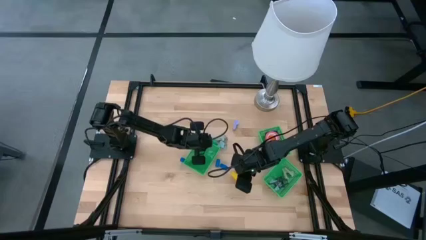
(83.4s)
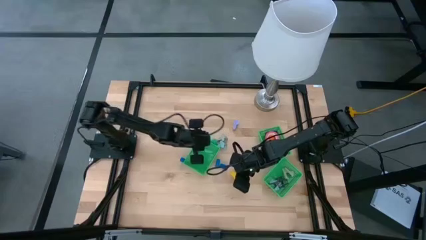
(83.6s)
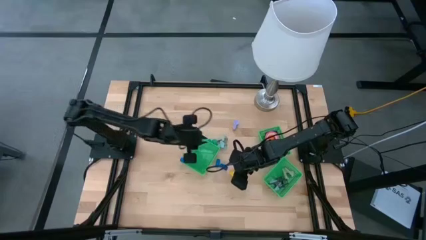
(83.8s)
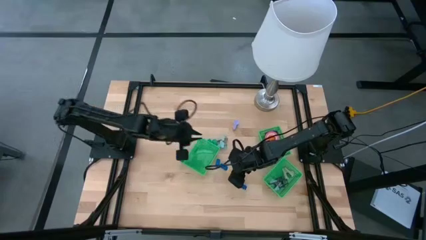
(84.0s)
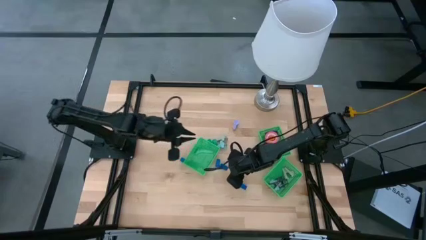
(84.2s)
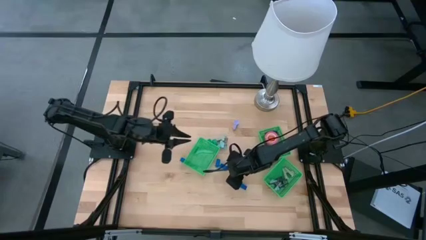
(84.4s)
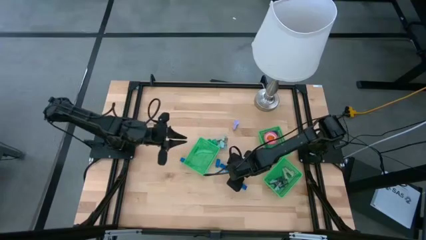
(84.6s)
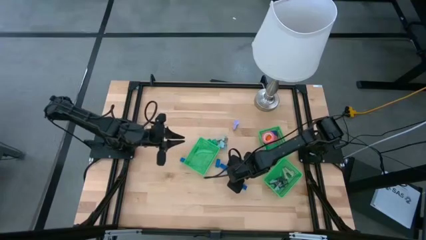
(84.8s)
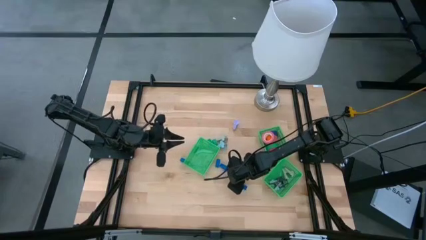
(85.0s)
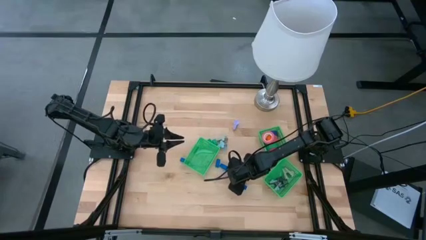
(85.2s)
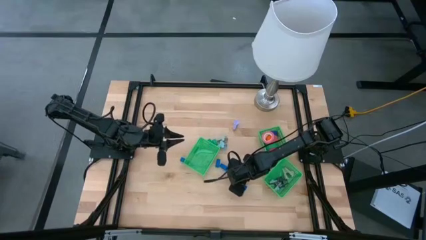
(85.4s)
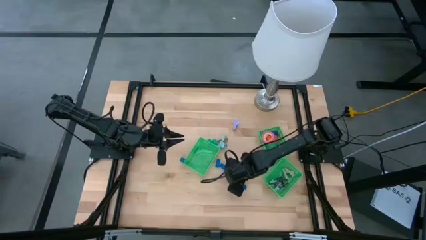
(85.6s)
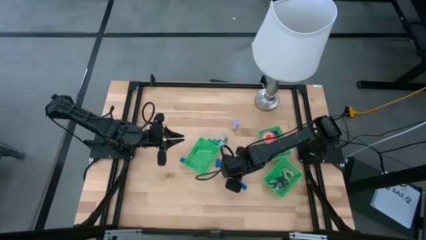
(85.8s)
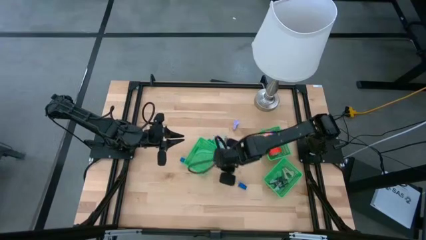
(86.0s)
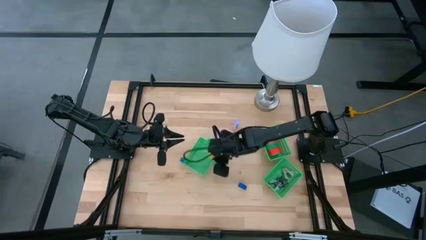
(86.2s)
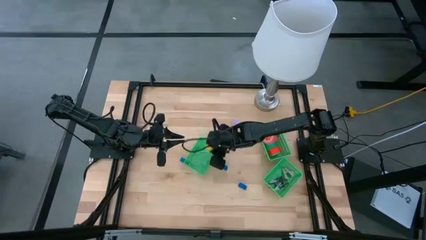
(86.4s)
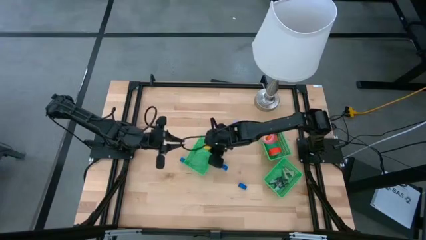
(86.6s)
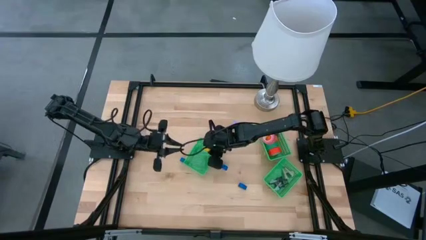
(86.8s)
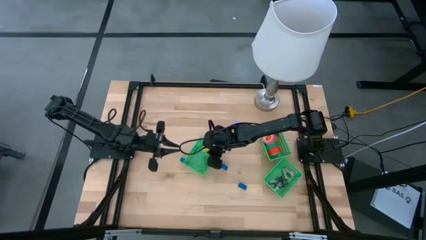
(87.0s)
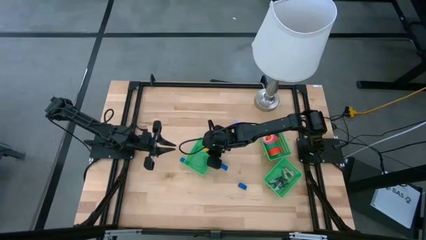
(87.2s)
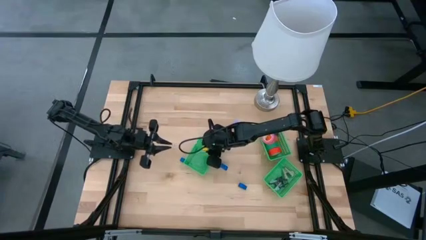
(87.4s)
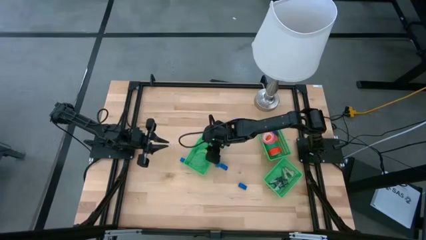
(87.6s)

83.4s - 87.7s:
Task: Pick and place Stapler, Stapler remover, tape
Put the yellow stapler into the center green bin

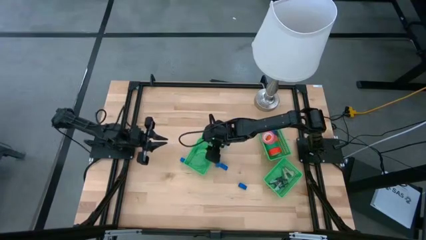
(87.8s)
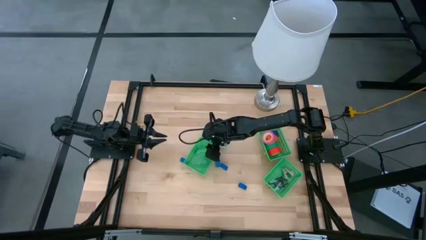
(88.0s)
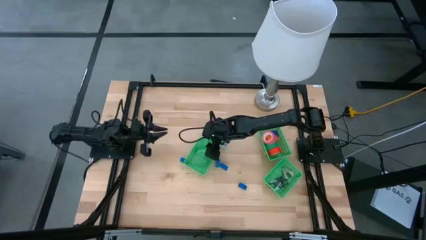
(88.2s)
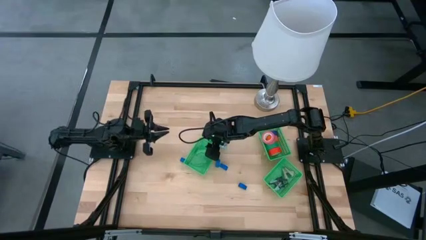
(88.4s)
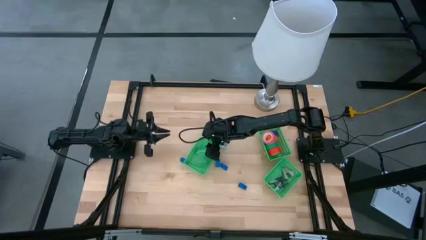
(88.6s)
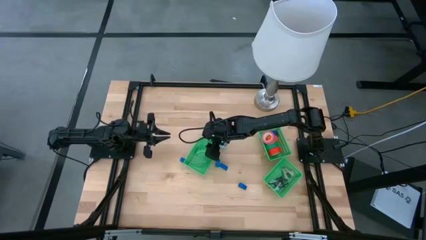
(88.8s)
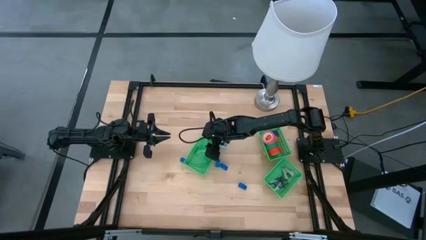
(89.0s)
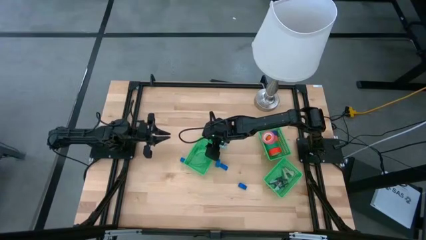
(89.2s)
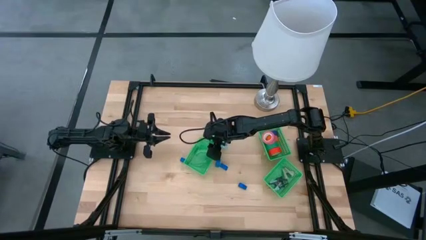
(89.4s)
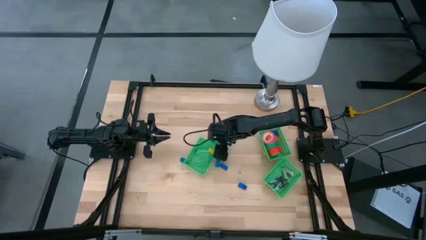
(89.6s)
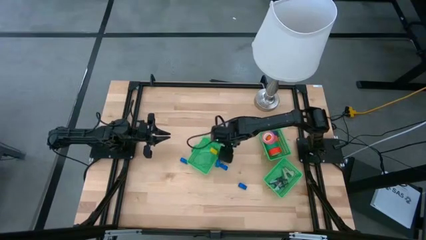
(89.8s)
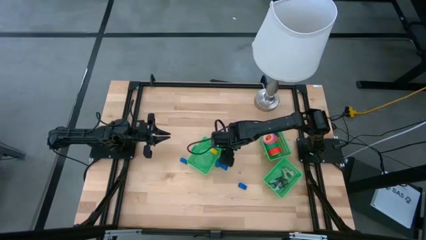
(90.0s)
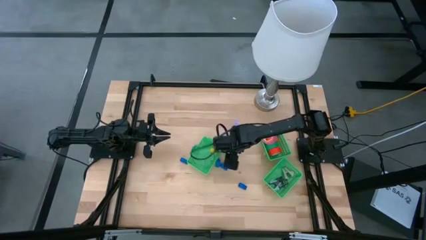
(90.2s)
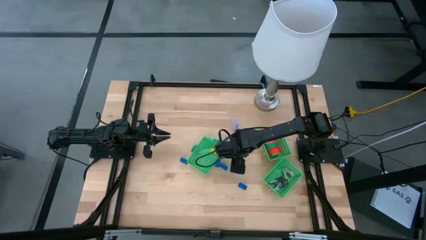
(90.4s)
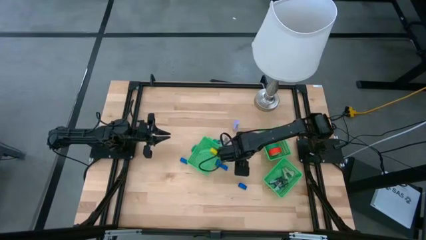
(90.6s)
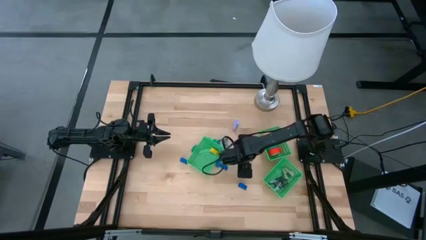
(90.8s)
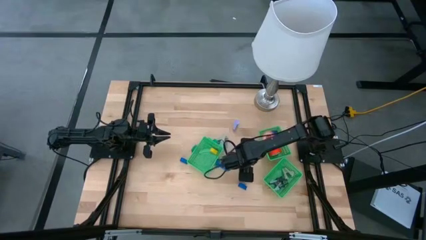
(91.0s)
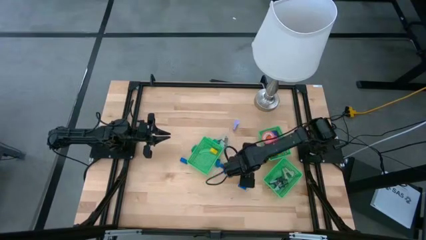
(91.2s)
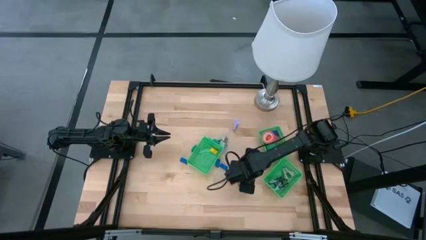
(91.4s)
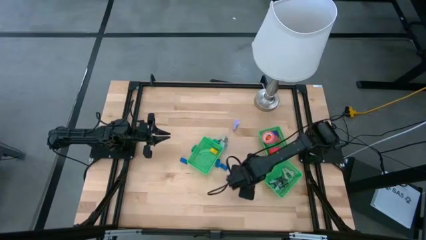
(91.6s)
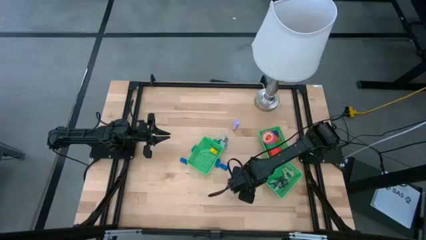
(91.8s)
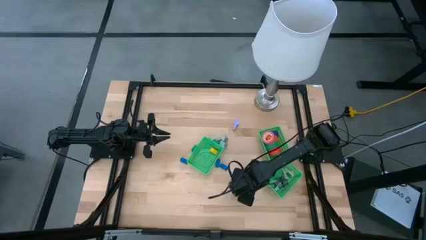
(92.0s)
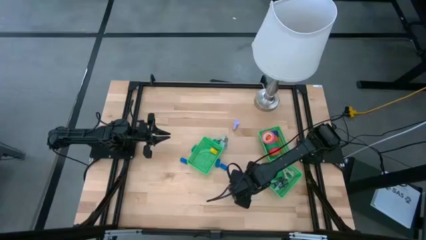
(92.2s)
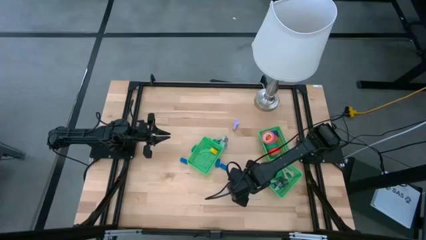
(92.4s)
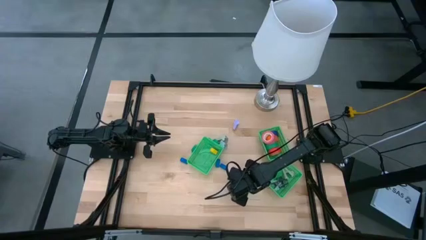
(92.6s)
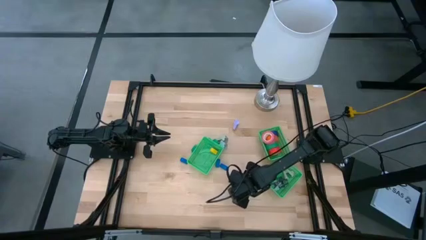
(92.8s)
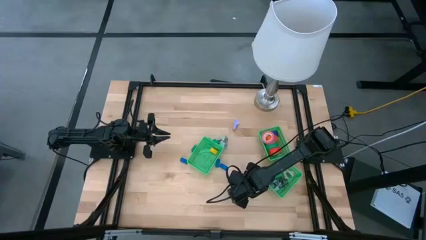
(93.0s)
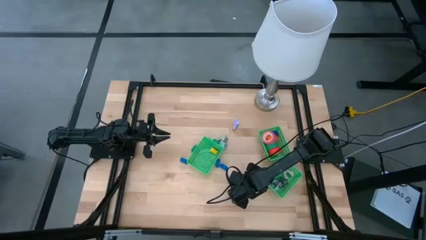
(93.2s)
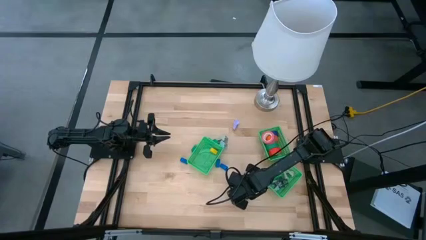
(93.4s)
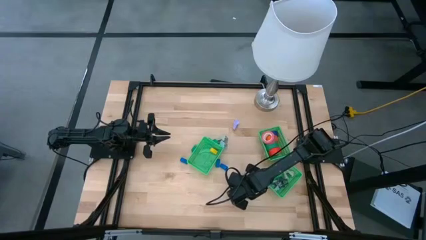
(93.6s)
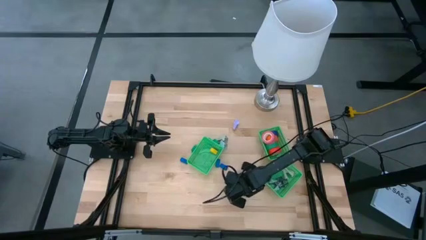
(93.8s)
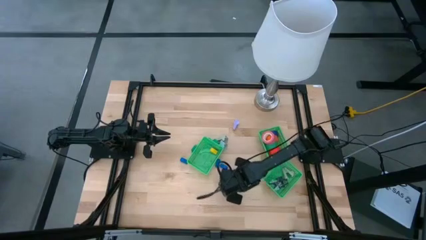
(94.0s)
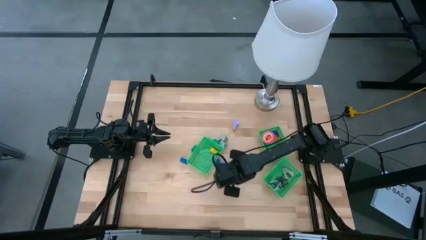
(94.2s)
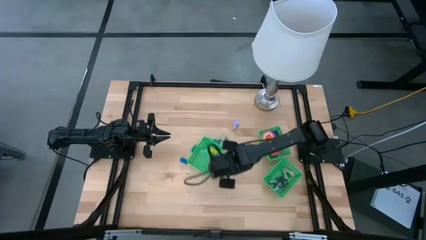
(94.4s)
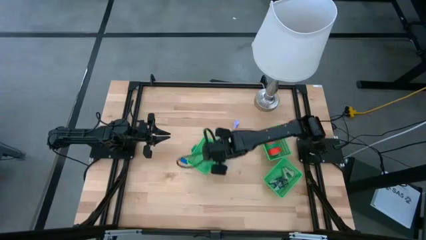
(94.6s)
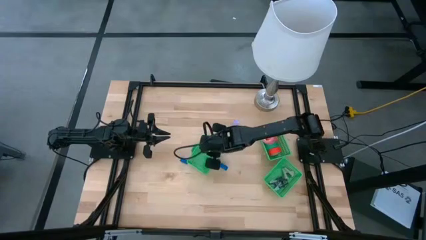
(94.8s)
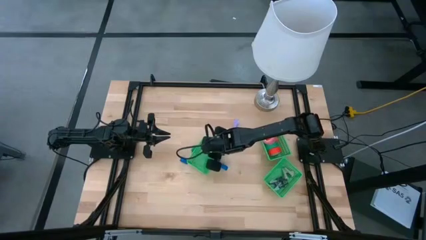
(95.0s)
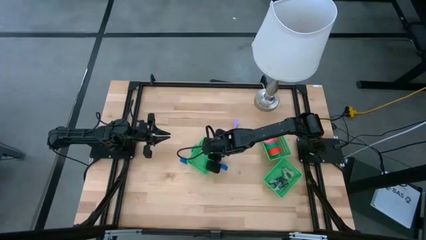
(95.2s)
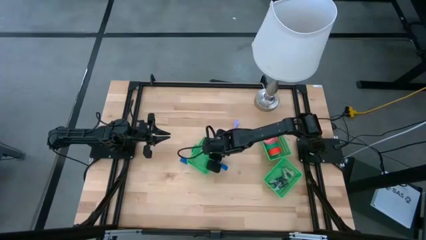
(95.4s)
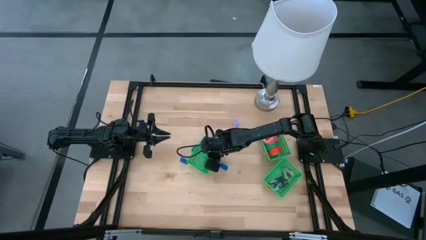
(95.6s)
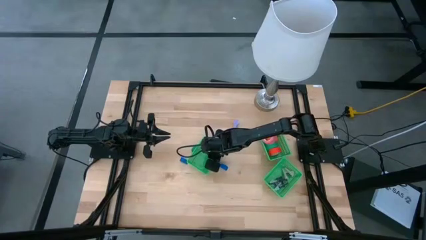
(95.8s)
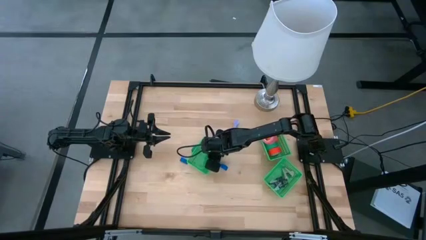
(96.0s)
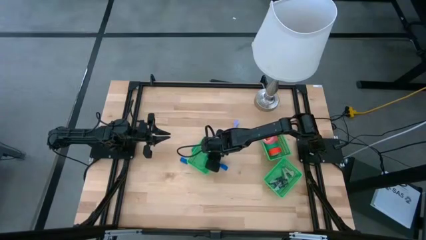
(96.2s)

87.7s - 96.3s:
Put the blue stapler into the center green bin

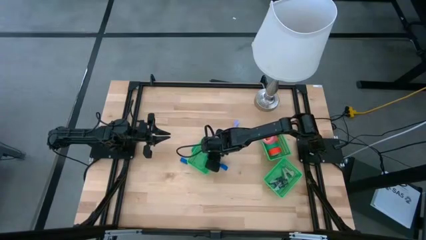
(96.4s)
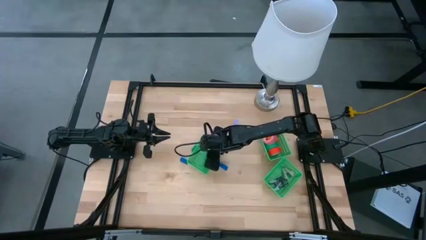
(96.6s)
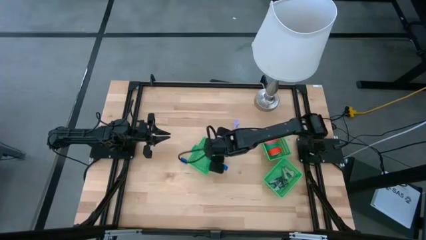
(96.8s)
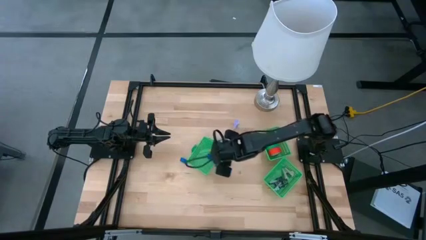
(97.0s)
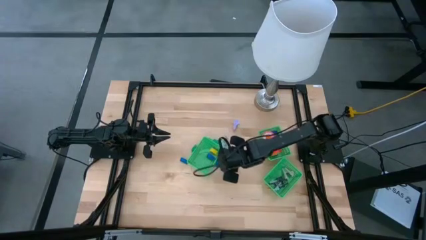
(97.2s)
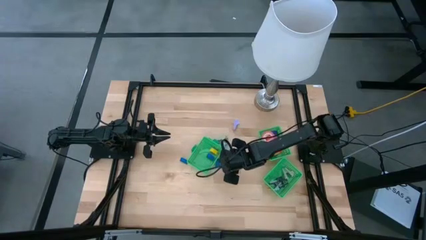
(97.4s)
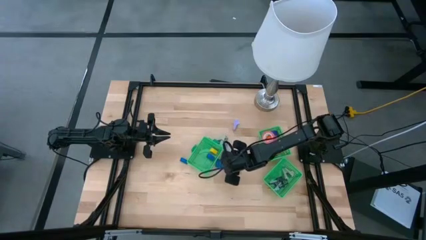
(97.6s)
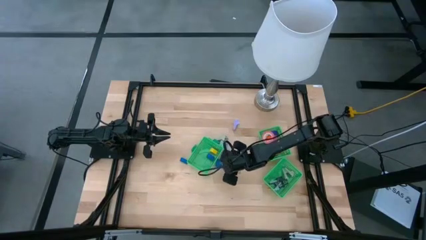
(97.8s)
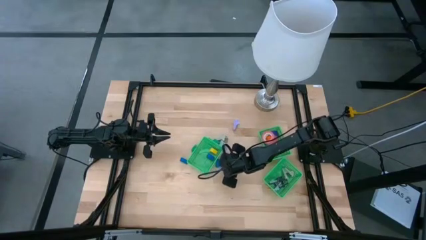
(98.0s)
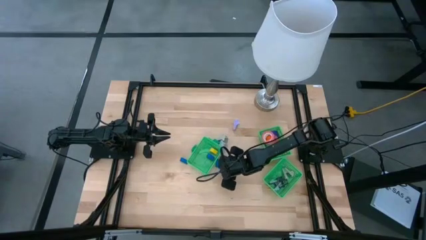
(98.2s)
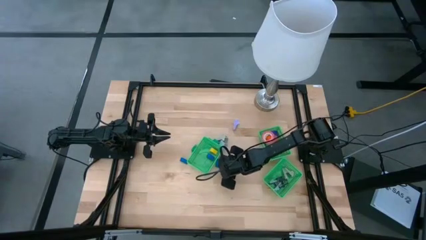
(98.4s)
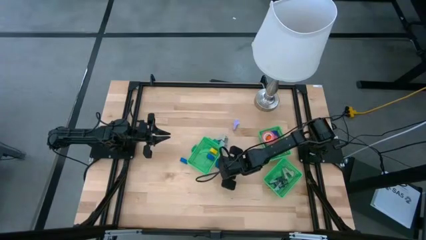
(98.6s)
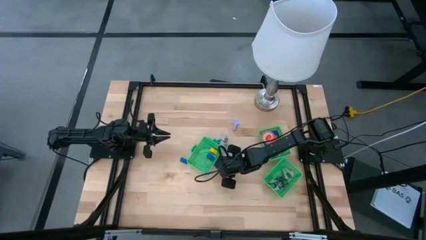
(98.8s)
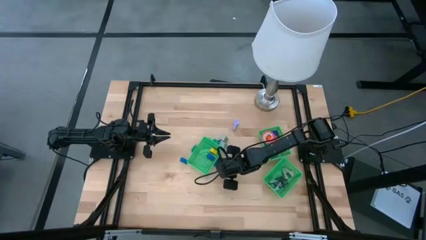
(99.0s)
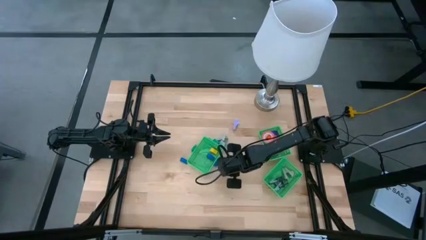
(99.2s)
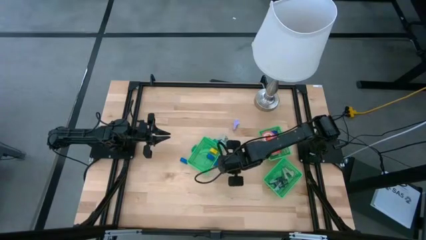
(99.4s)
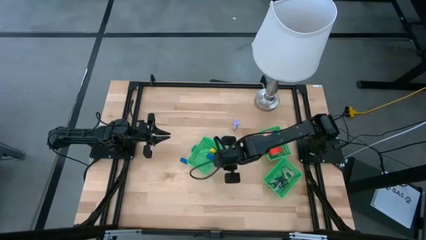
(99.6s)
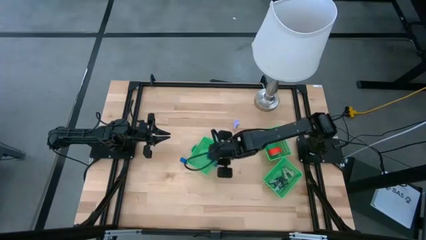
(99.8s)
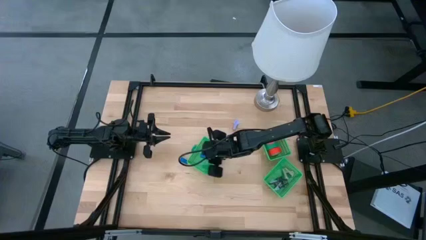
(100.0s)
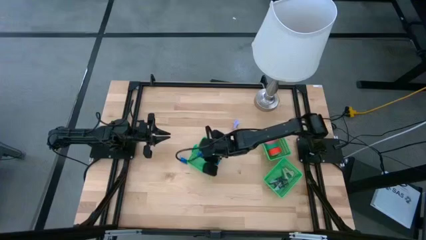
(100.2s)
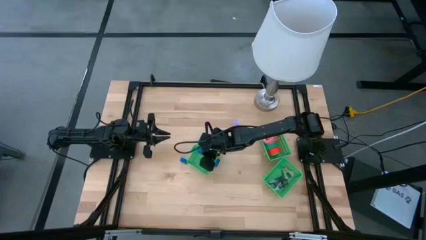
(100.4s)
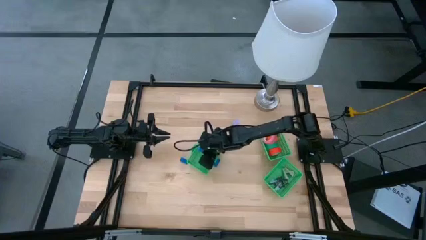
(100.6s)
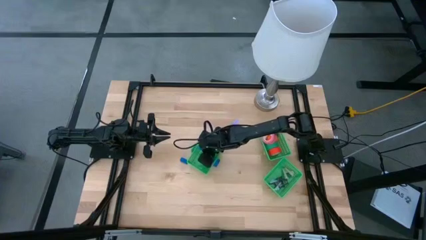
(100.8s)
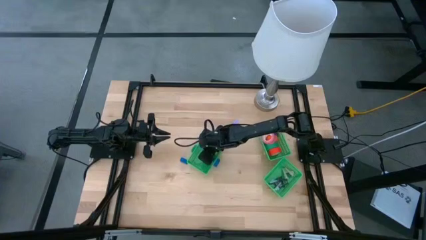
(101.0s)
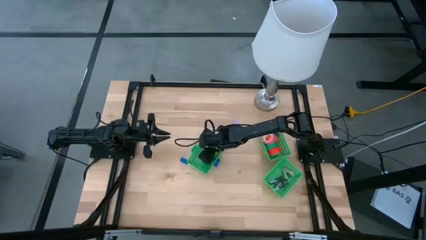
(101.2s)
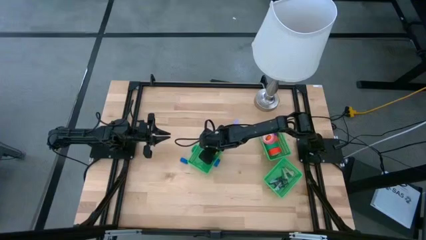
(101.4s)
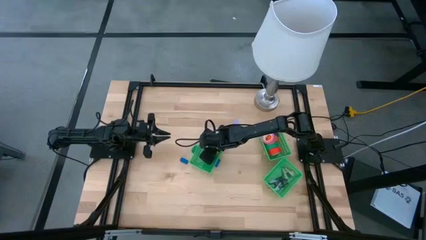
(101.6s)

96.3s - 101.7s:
Put the blue stapler into the center green bin
